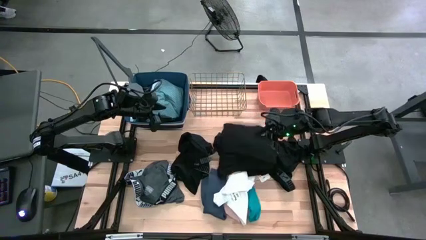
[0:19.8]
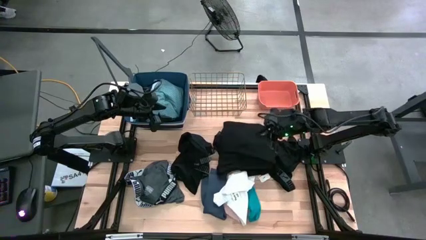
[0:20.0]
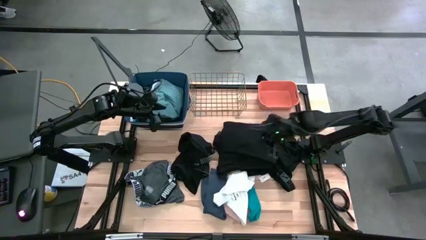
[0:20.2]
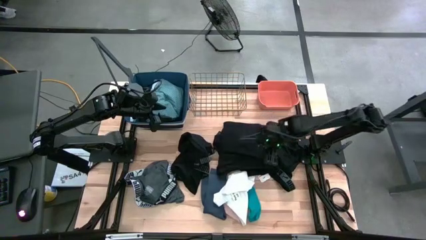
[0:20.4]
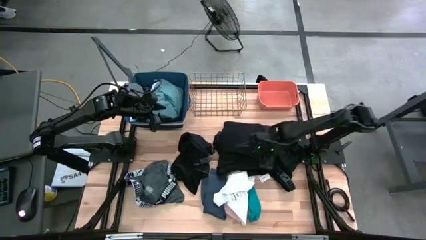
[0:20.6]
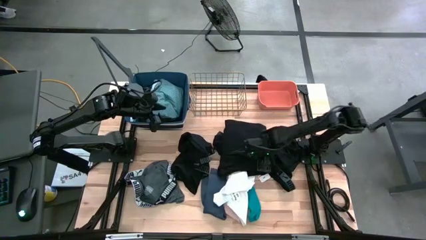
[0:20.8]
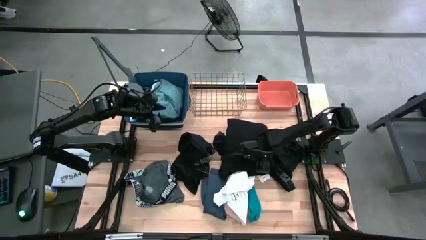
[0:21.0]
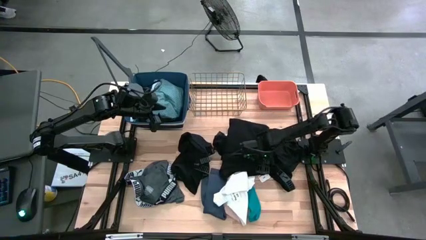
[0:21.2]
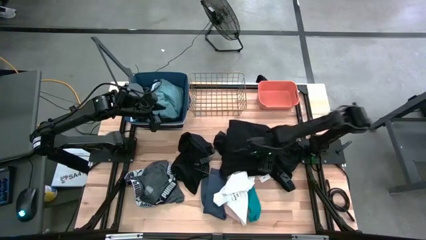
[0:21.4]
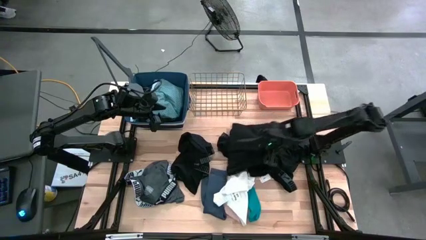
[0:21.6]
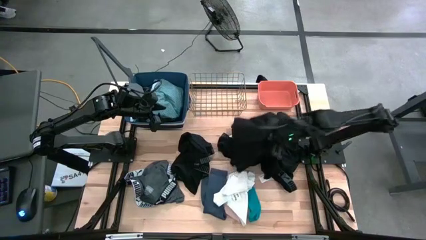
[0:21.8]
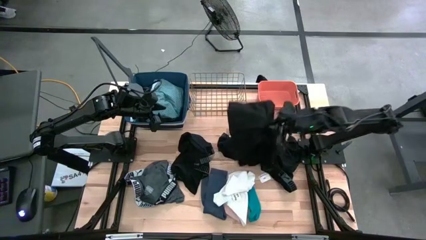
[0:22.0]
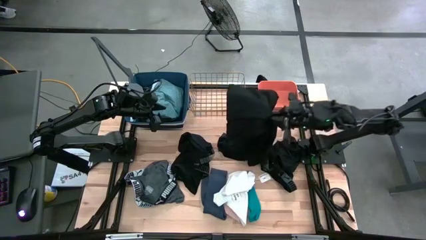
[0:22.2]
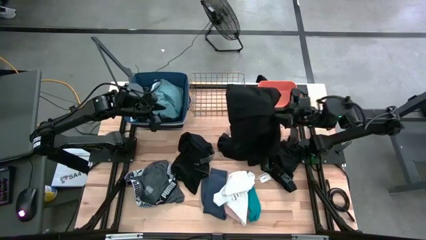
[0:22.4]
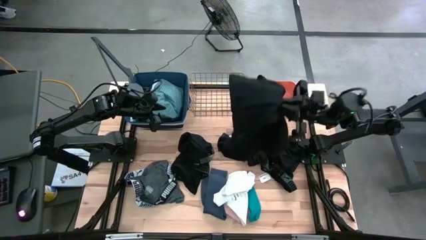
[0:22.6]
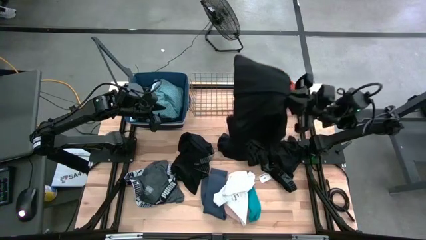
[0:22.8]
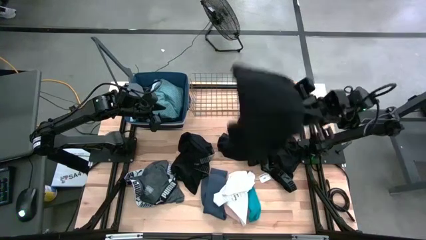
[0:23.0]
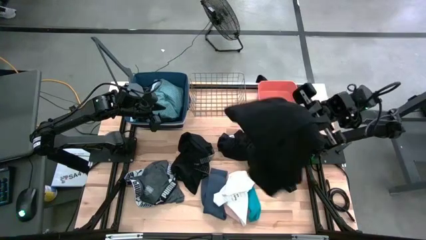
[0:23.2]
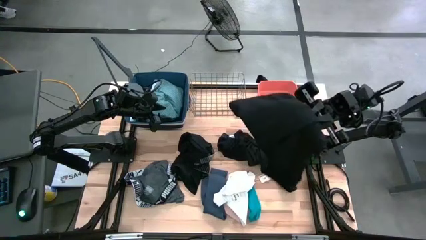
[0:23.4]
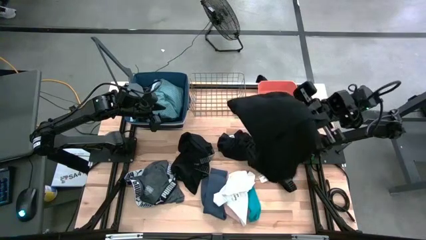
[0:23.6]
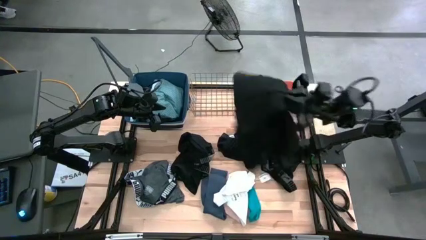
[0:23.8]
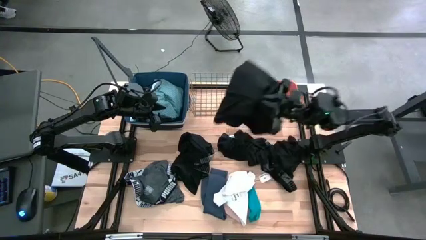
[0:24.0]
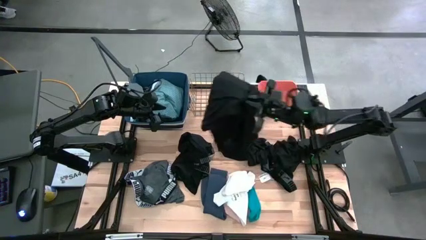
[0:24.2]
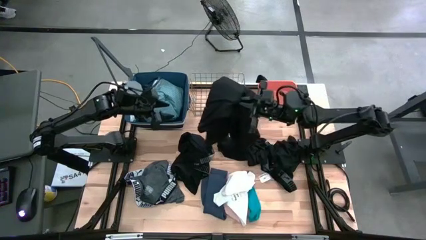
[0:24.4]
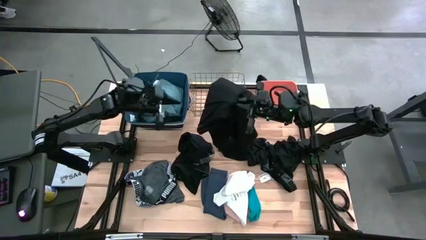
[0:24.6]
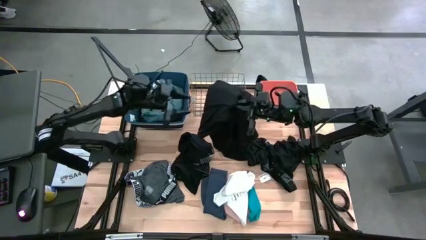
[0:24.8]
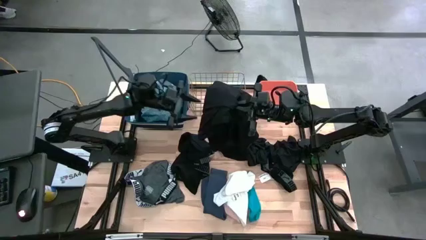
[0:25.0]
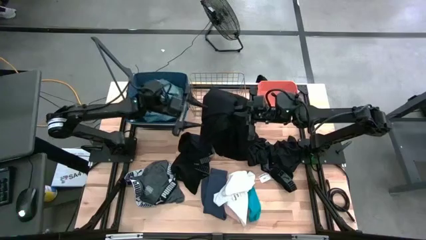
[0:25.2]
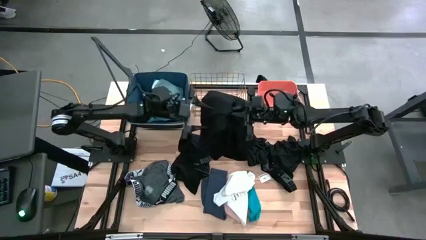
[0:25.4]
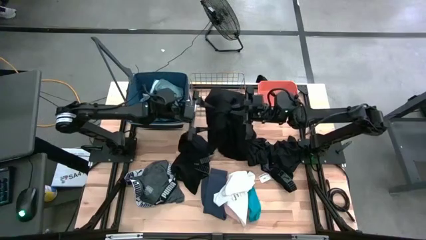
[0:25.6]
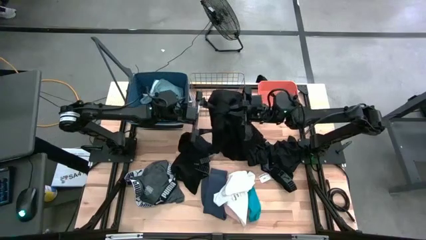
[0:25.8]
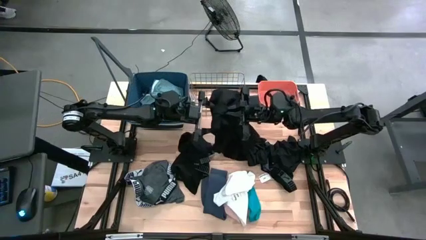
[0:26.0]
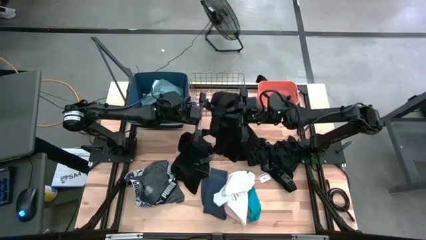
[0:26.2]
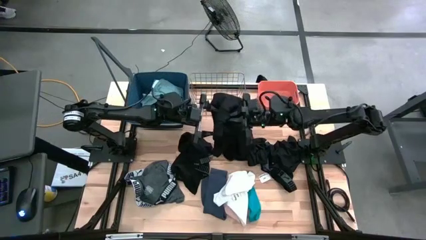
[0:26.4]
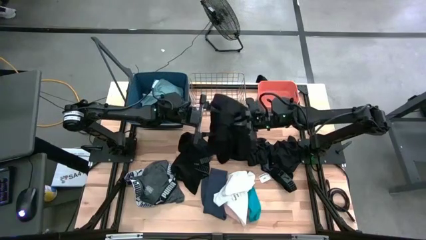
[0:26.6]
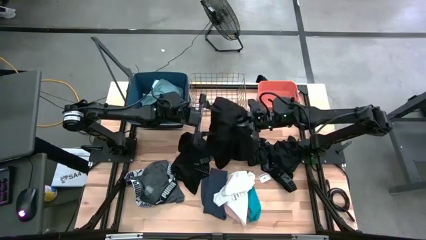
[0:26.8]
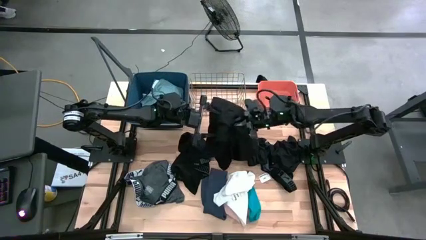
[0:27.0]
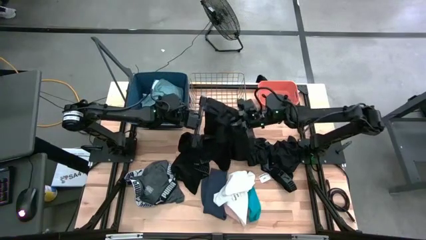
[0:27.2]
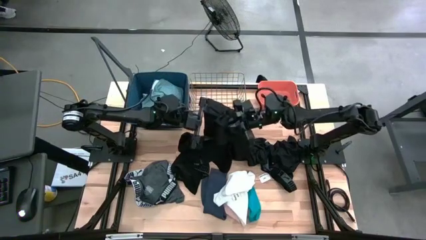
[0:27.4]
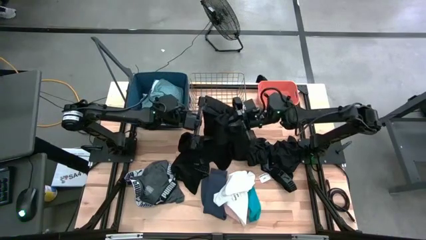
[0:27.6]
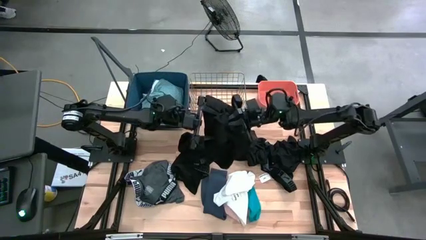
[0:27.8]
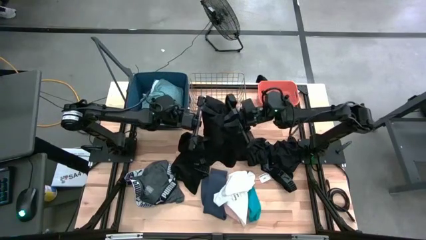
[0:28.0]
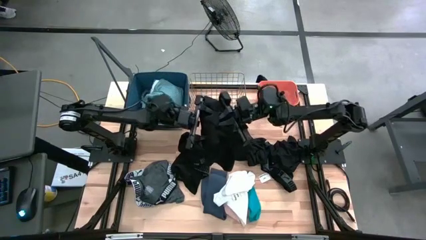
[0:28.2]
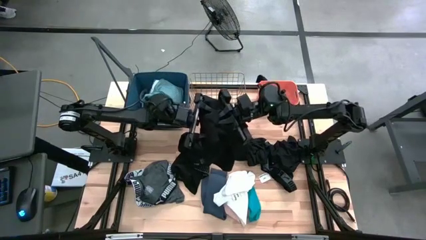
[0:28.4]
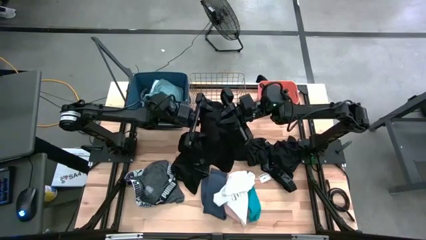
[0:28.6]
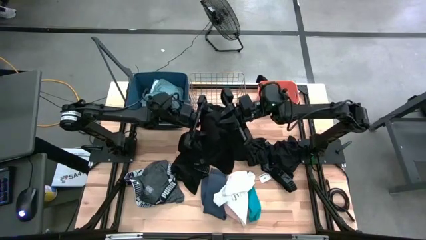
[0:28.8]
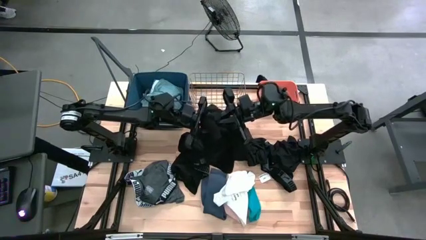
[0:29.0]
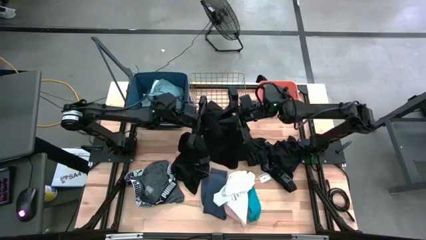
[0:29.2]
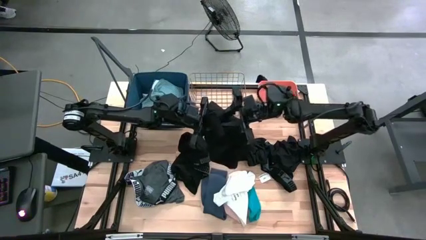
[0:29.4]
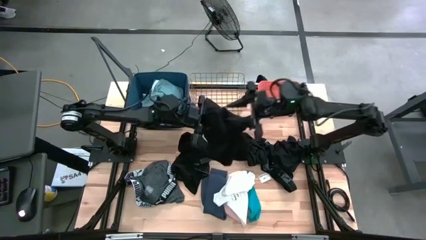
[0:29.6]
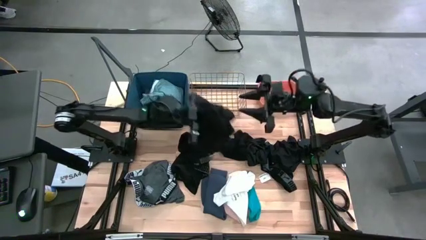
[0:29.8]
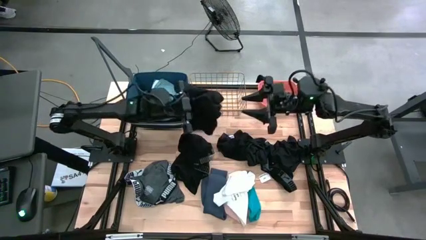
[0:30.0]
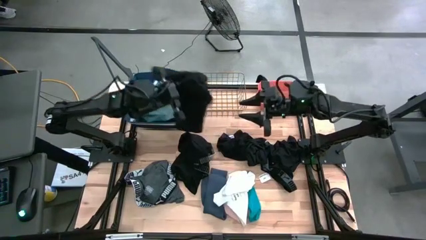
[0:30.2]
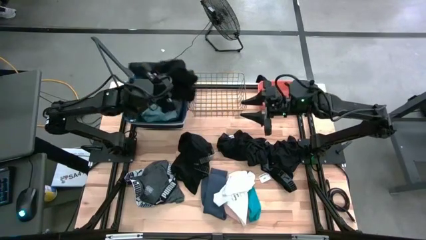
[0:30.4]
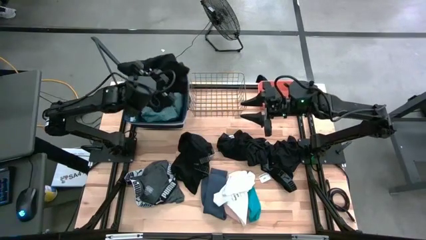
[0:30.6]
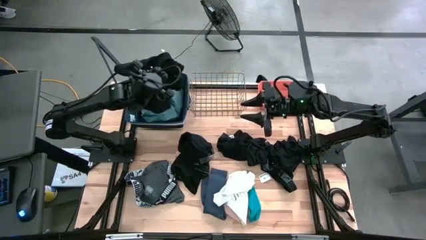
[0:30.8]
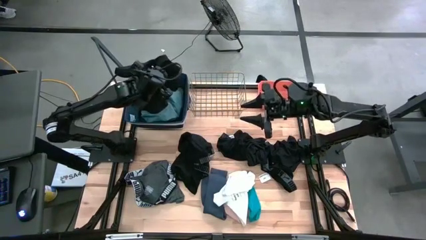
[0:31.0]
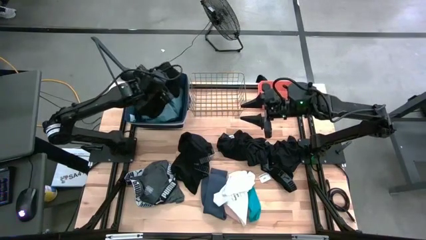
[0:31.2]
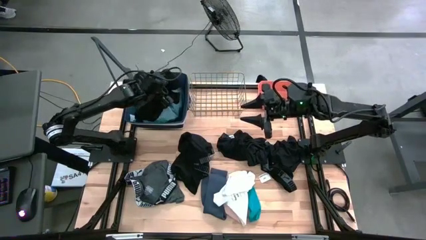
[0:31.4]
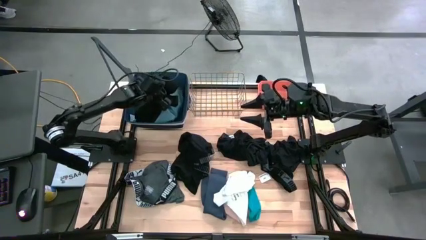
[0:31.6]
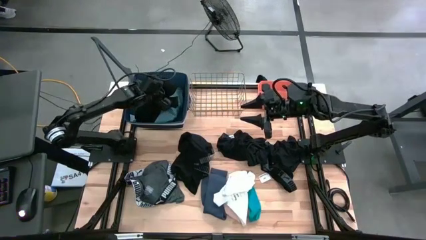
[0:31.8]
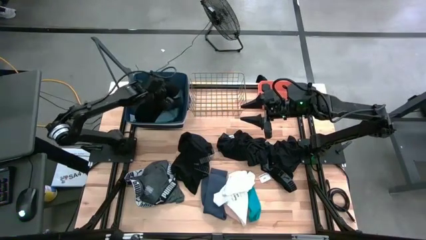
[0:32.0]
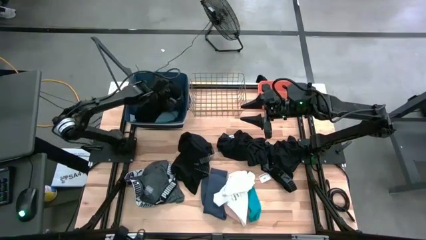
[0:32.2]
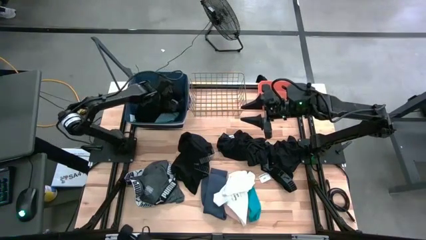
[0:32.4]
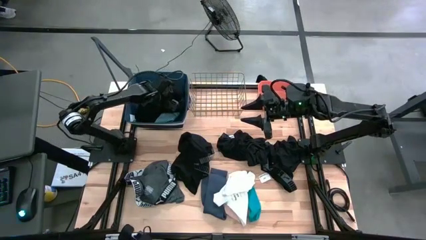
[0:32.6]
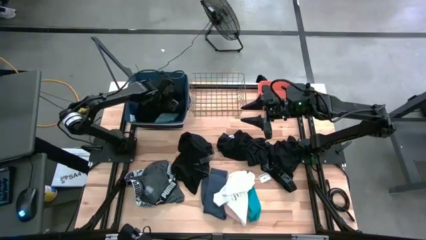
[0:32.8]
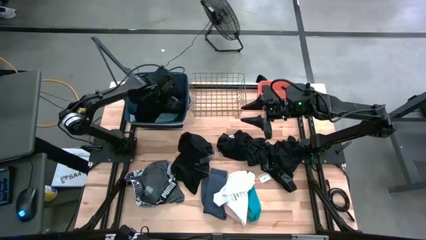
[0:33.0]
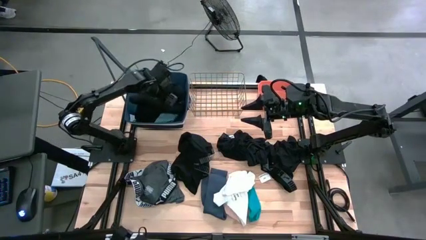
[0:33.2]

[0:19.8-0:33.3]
Task: Pick & Place Cloths
Put the black shirt into the blue bin
